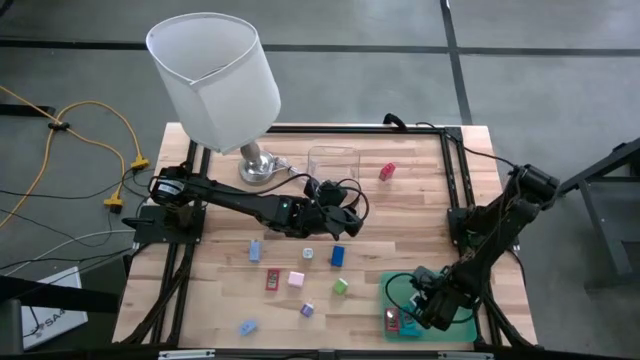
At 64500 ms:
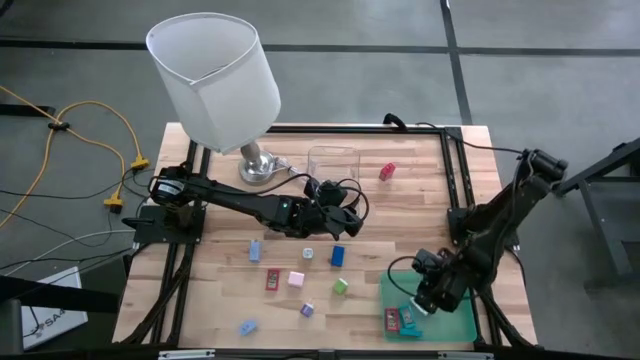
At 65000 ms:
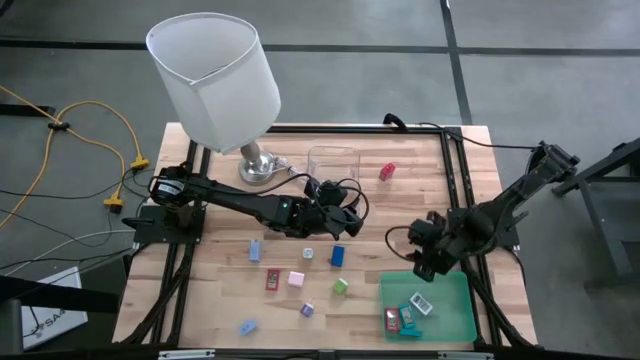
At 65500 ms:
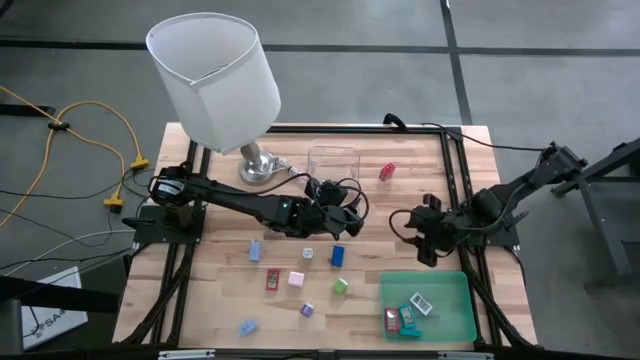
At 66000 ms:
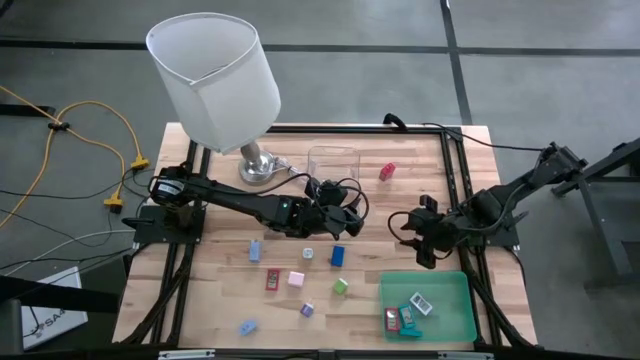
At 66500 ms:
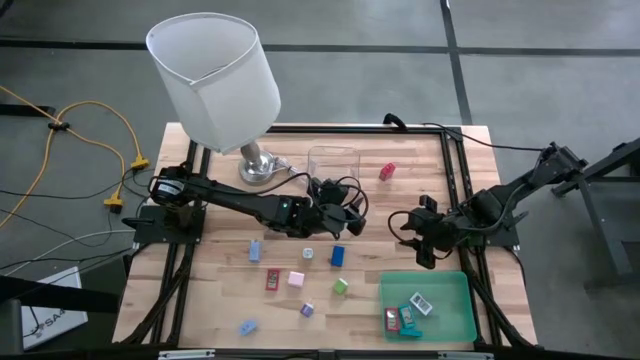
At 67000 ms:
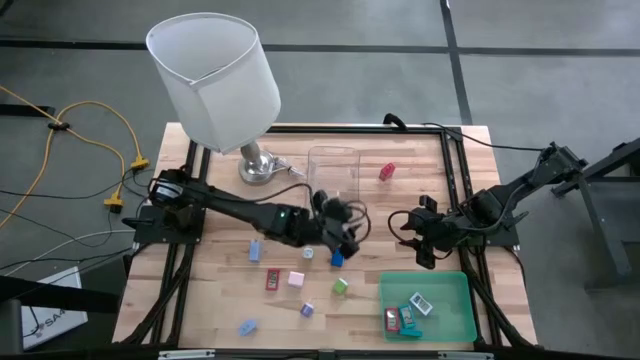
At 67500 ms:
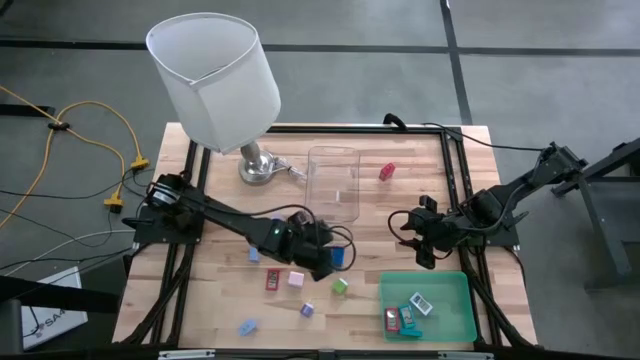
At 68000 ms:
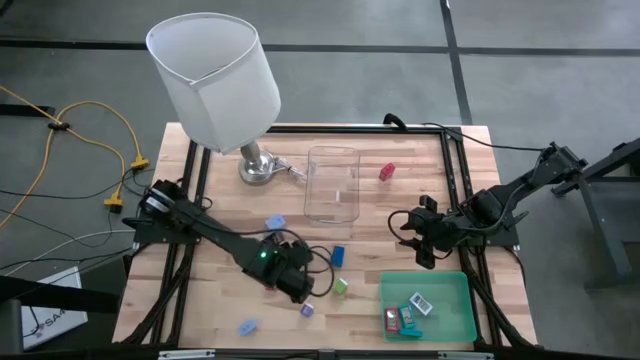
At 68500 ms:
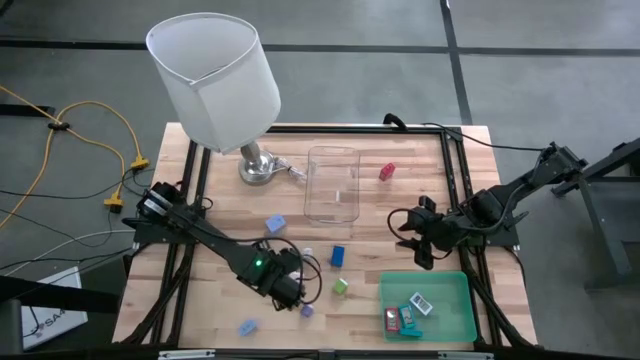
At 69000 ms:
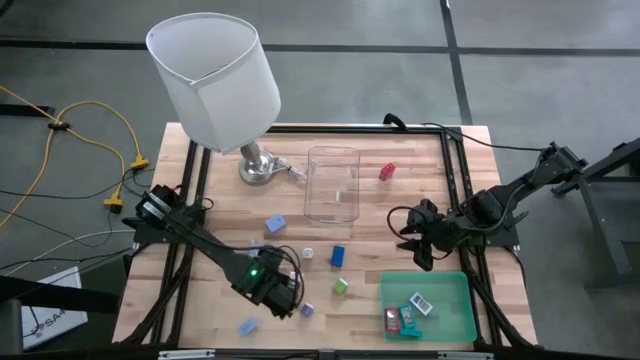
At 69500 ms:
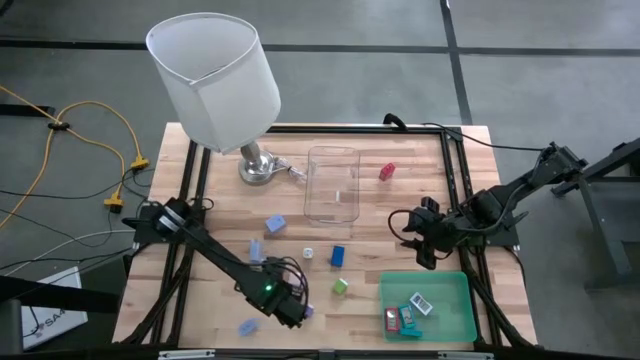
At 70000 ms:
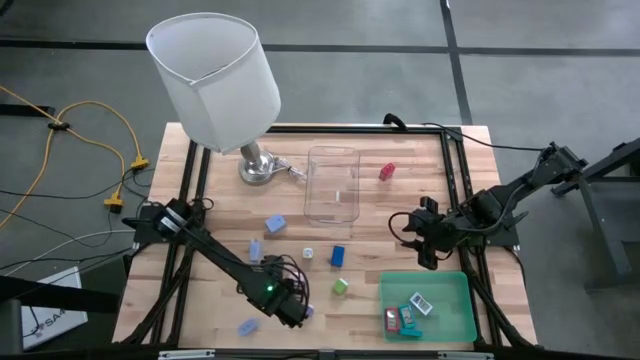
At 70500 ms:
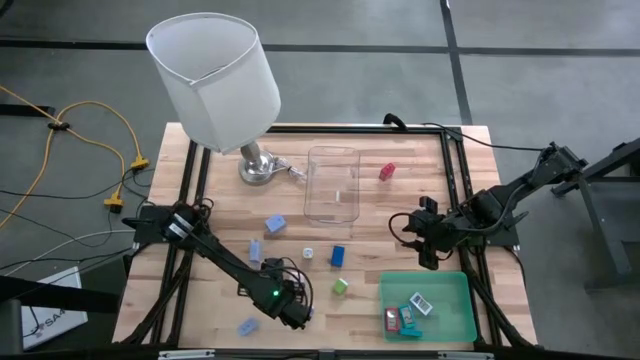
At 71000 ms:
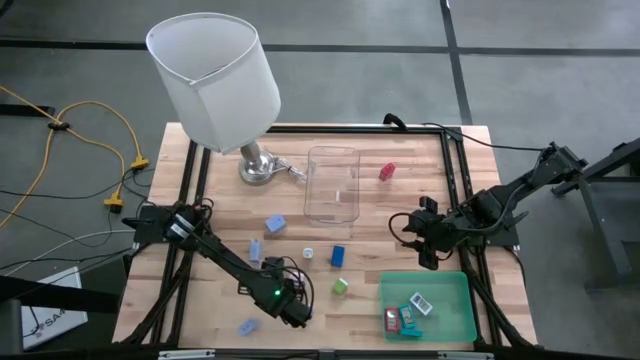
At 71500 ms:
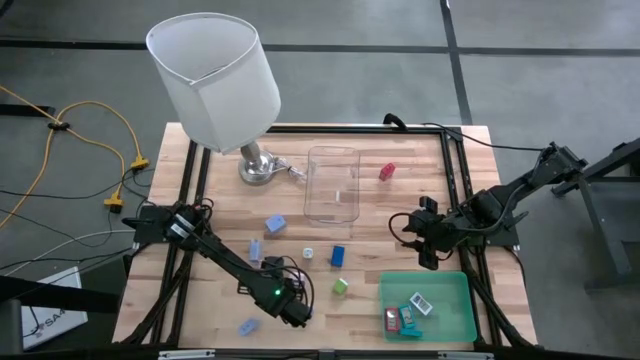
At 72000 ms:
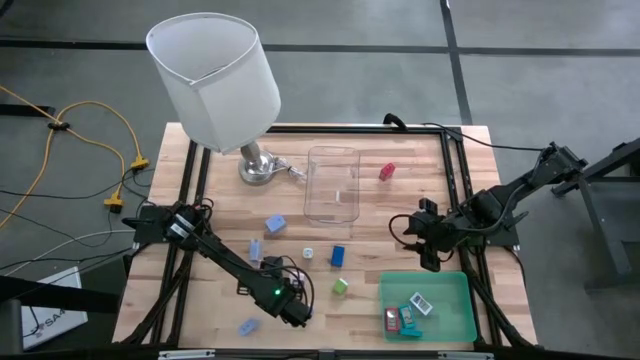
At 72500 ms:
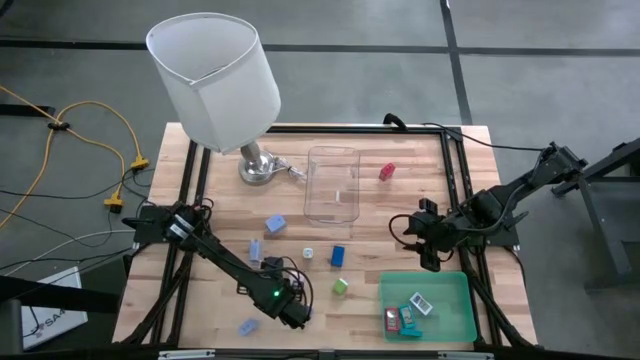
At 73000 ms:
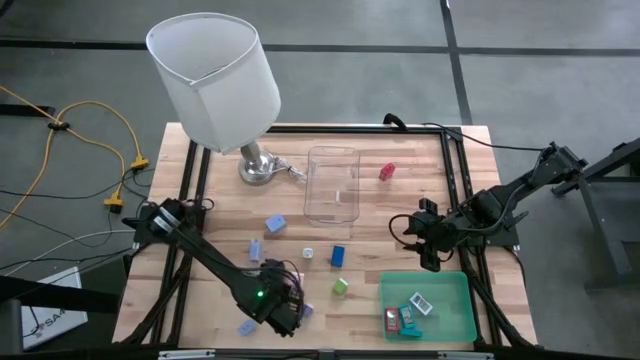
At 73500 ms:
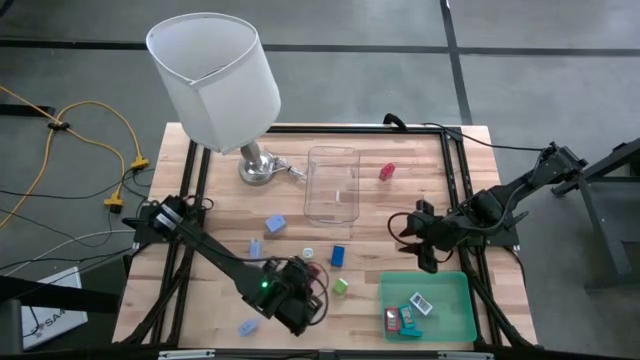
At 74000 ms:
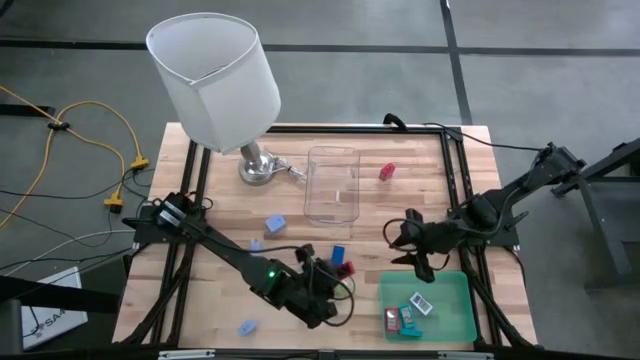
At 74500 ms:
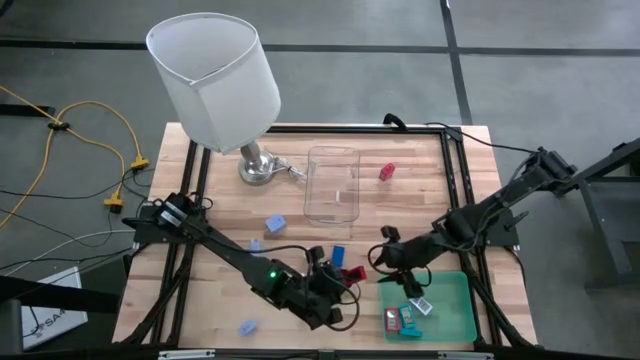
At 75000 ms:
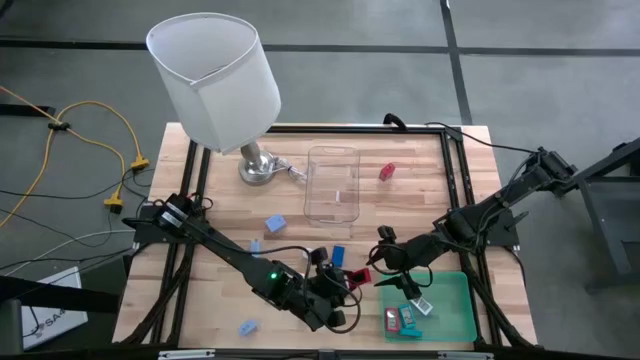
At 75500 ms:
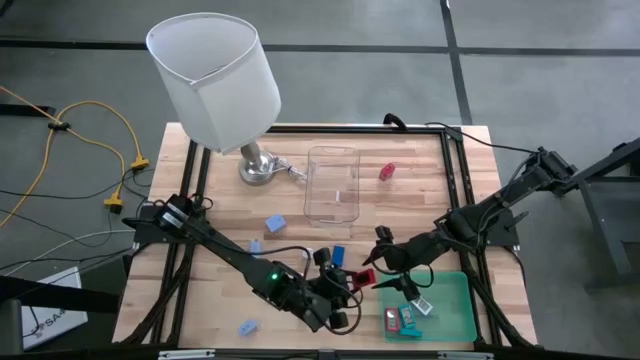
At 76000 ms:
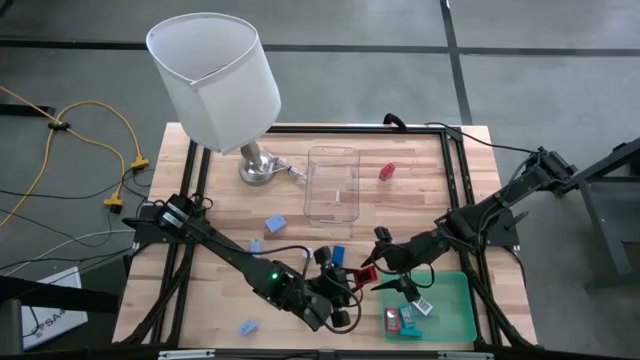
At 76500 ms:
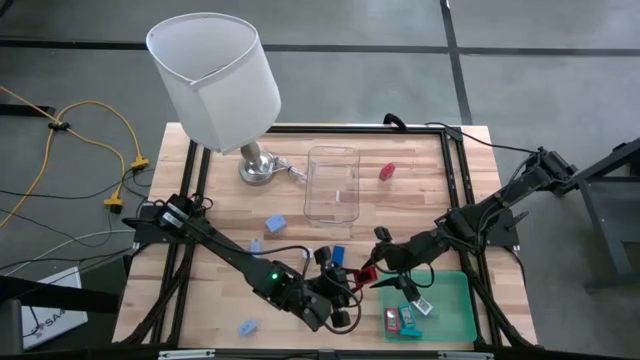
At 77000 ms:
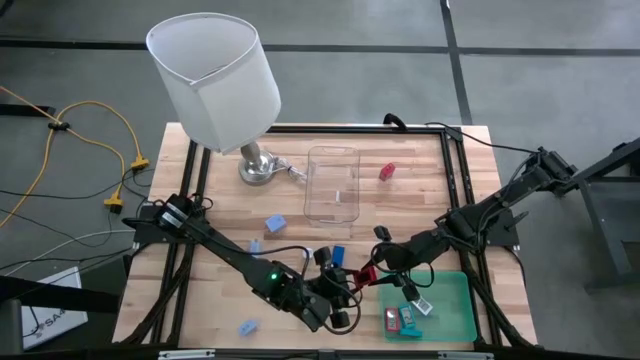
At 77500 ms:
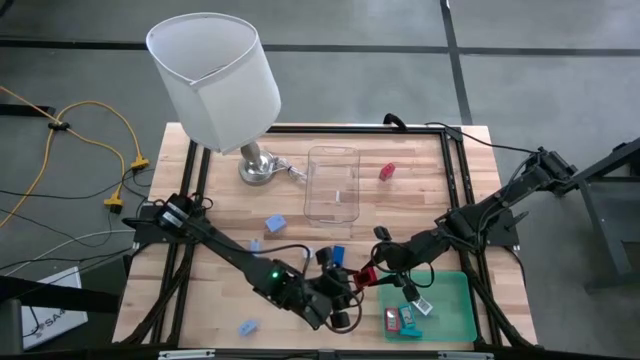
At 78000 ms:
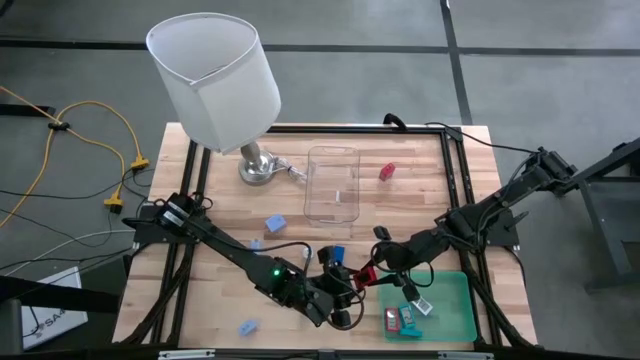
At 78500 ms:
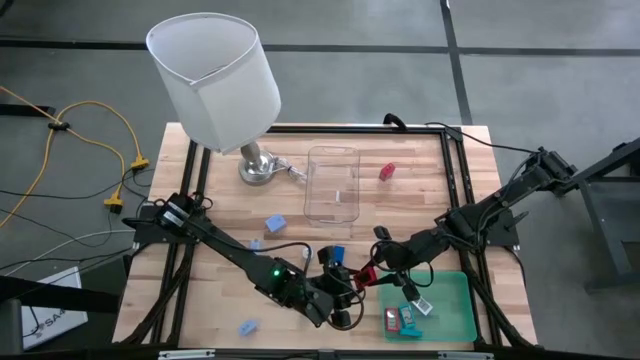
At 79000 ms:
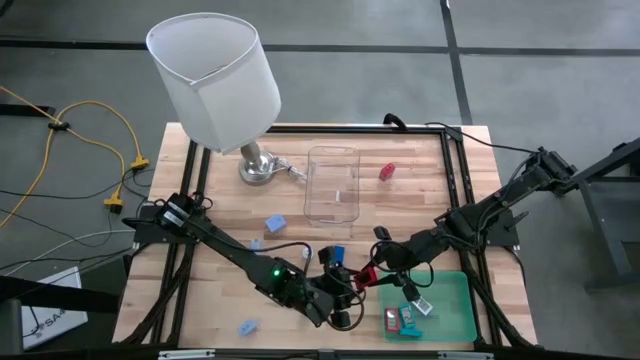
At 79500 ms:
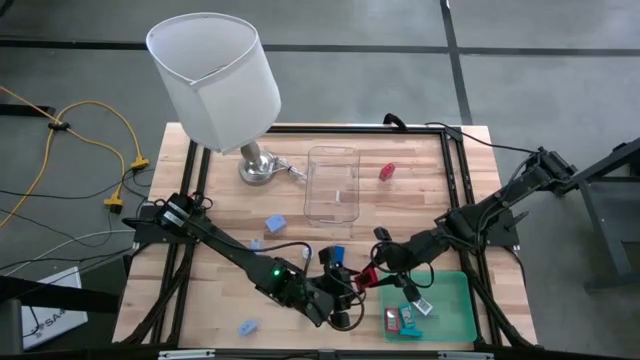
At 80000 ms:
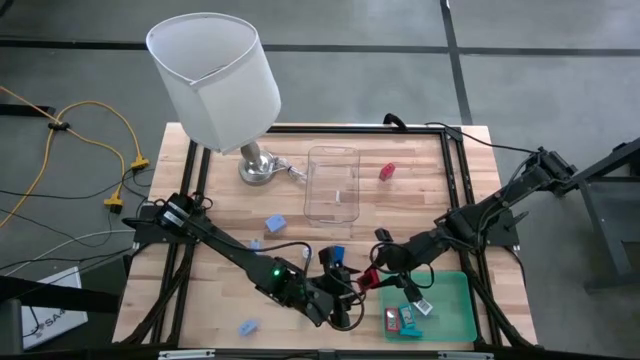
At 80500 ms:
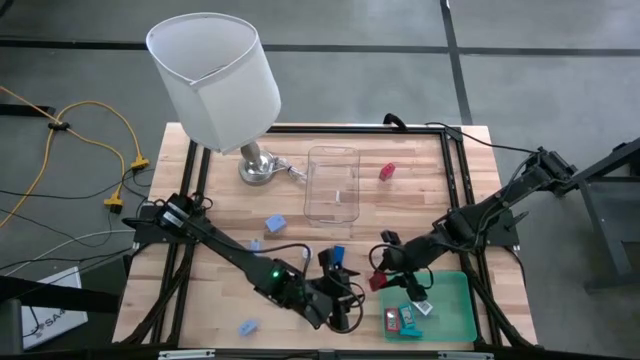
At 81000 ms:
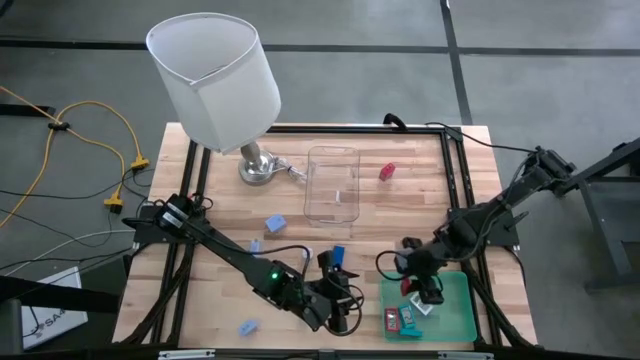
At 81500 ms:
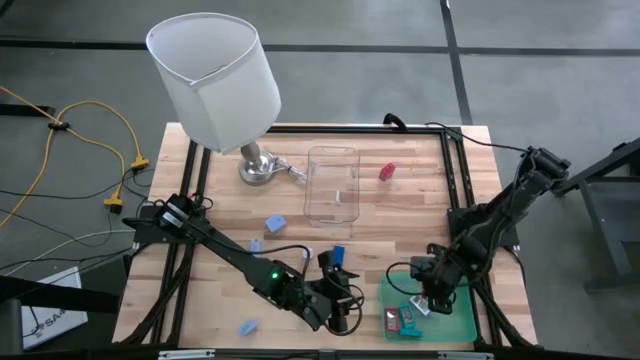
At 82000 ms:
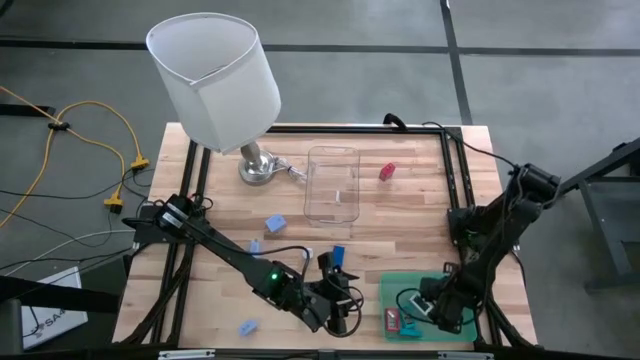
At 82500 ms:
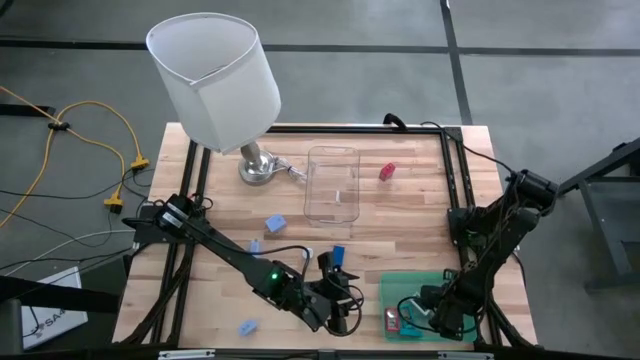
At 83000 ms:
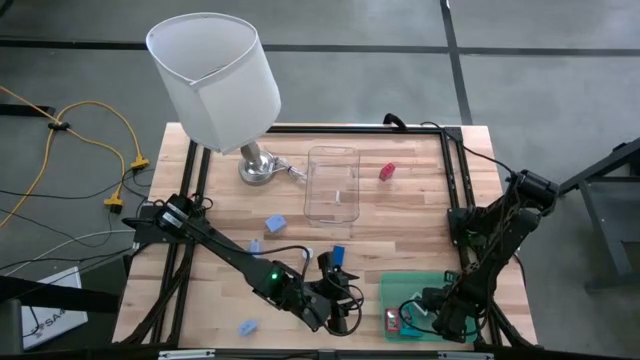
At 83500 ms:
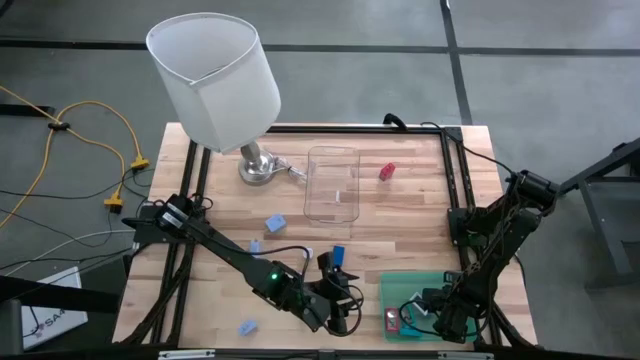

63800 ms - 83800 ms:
Task: Pick & Place Office items
Put the red digital clock into the green bin

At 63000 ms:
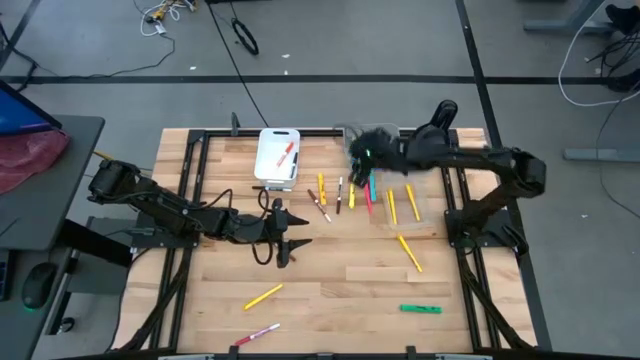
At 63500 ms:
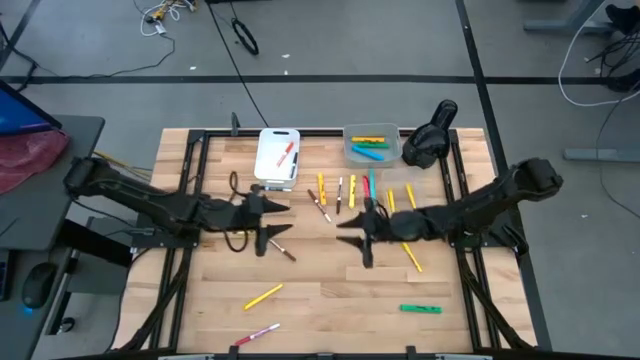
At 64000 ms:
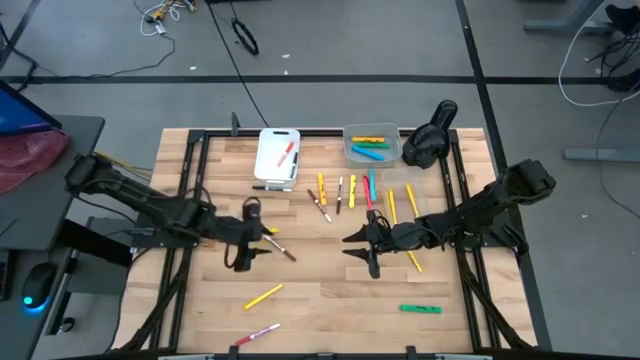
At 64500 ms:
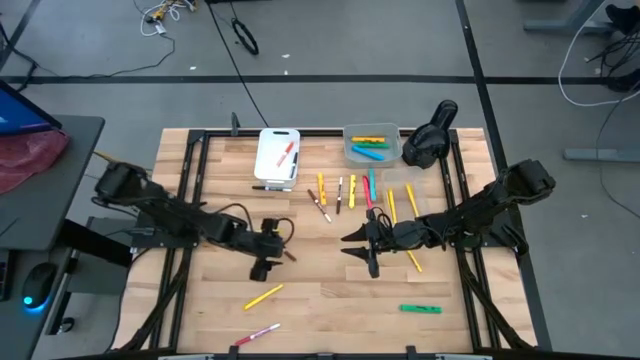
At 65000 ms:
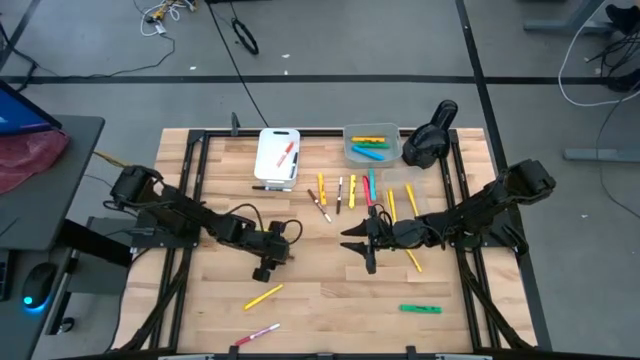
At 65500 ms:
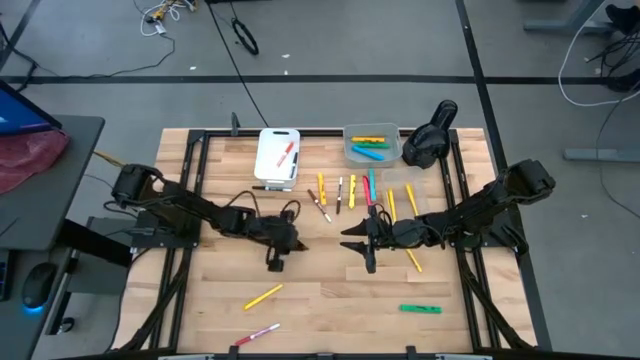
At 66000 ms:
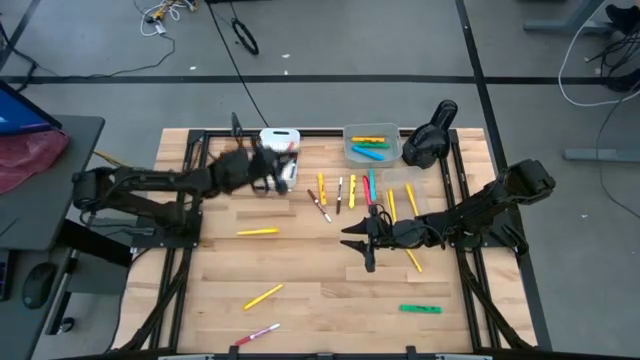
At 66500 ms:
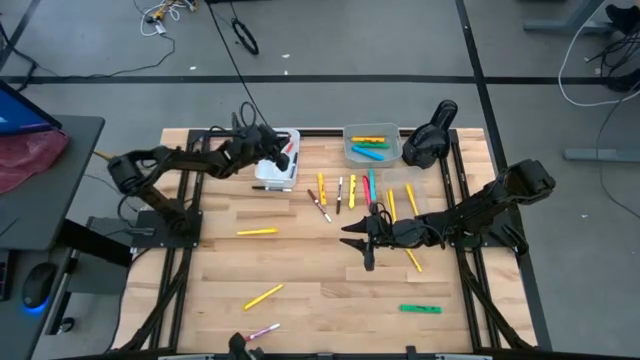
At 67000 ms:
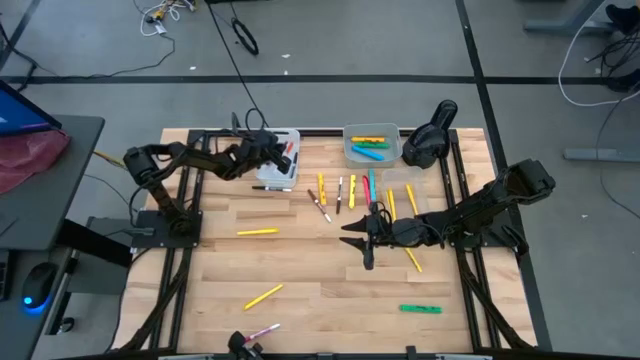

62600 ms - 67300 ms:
Task: Pick & Place Markers
Put the light brown marker pen into the white bin
